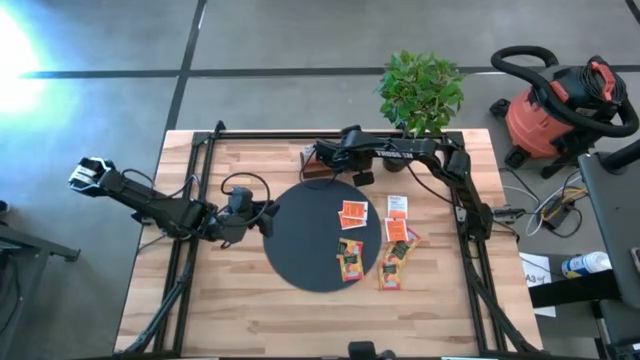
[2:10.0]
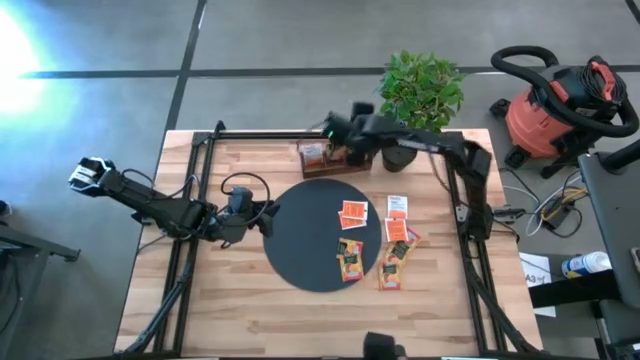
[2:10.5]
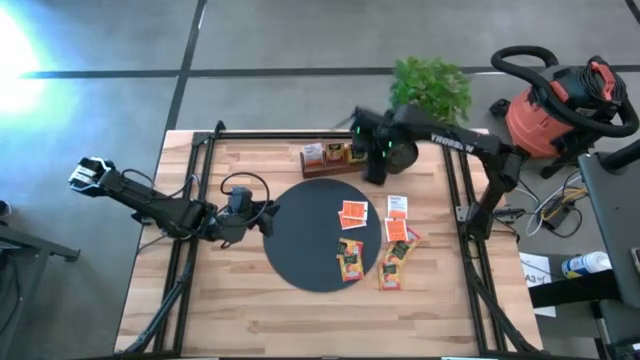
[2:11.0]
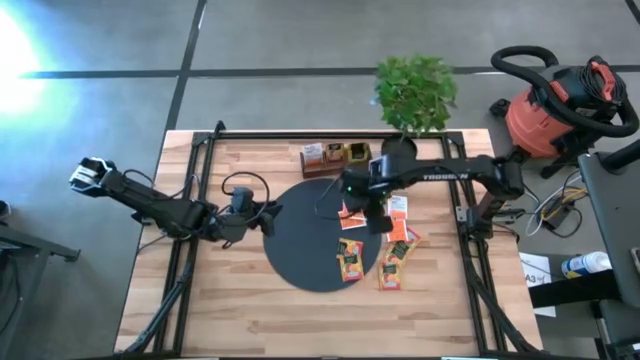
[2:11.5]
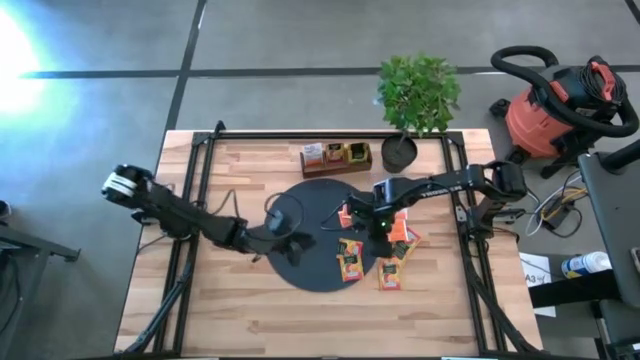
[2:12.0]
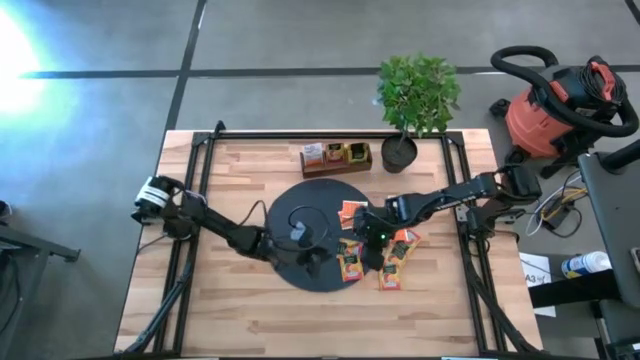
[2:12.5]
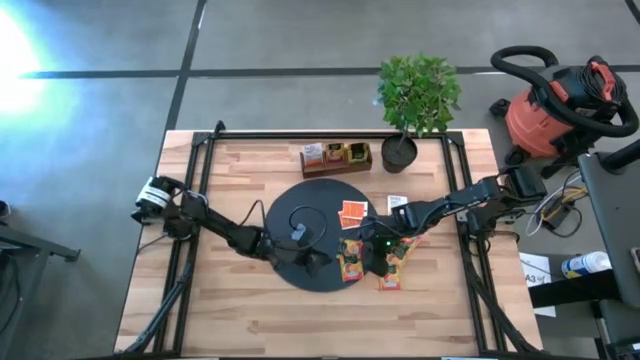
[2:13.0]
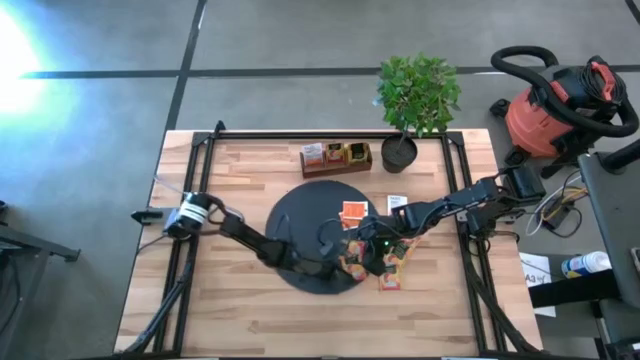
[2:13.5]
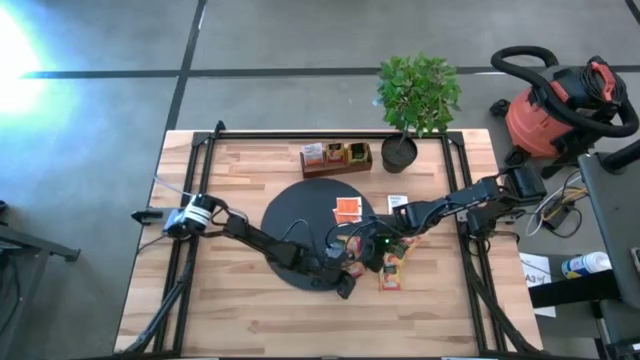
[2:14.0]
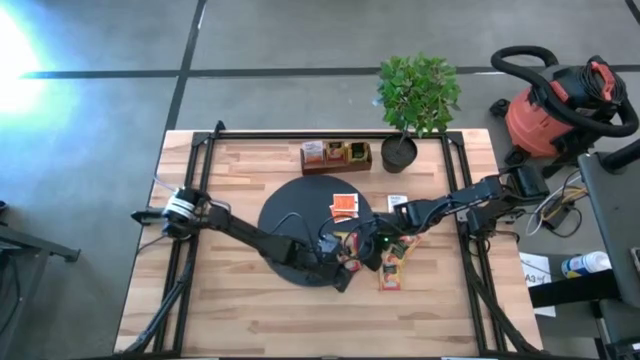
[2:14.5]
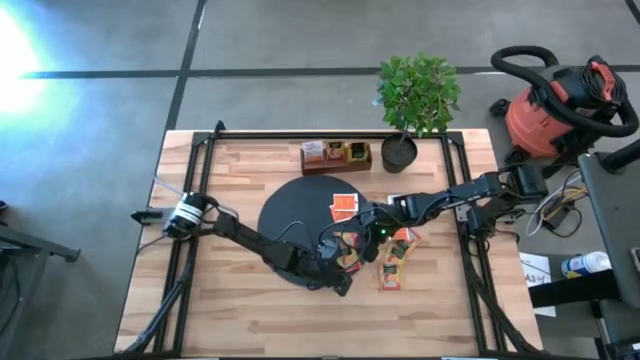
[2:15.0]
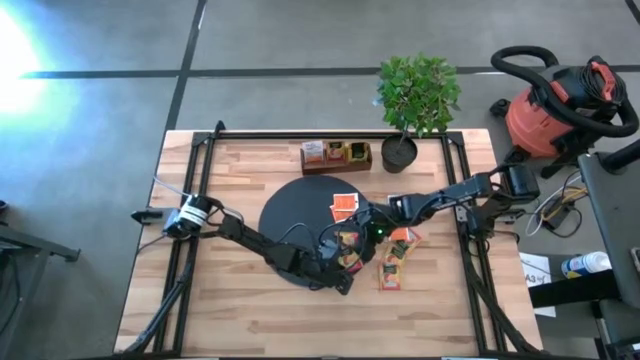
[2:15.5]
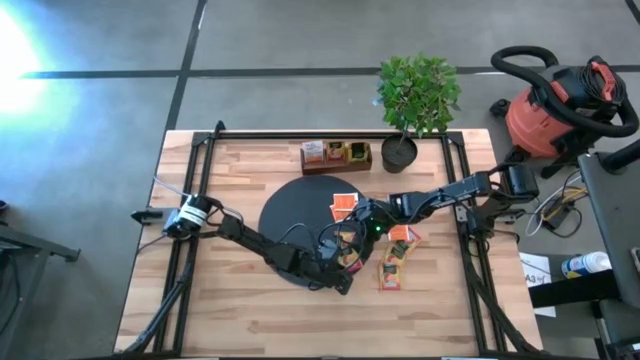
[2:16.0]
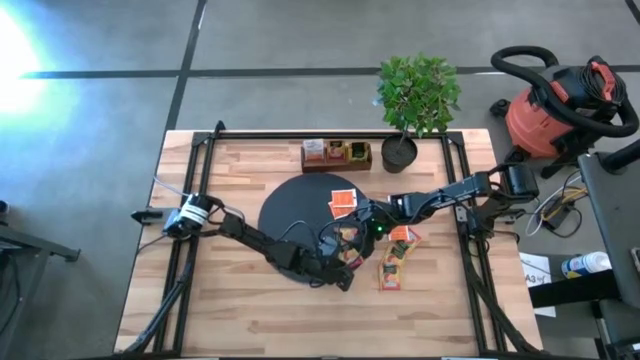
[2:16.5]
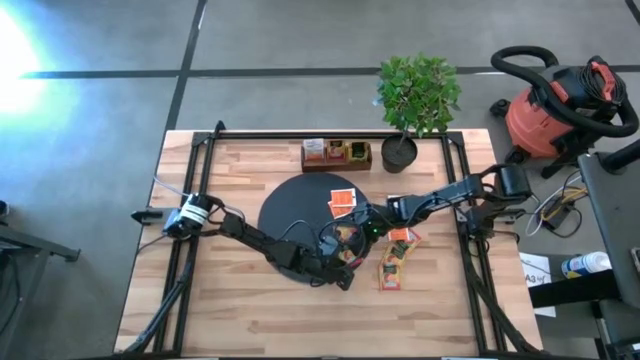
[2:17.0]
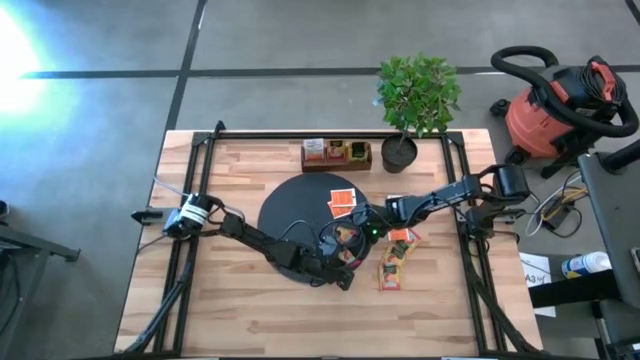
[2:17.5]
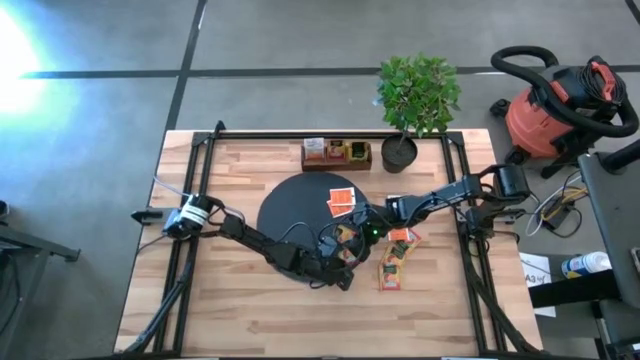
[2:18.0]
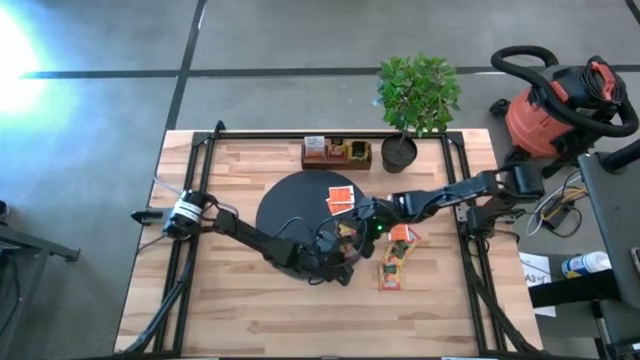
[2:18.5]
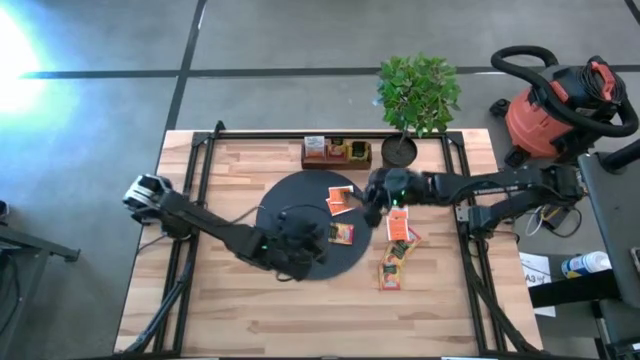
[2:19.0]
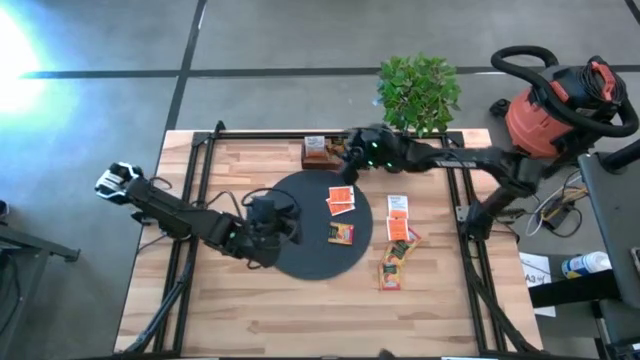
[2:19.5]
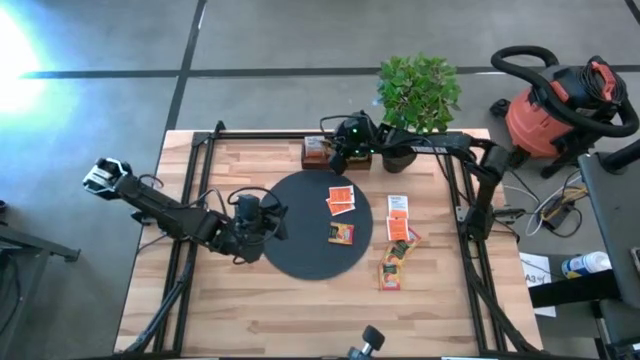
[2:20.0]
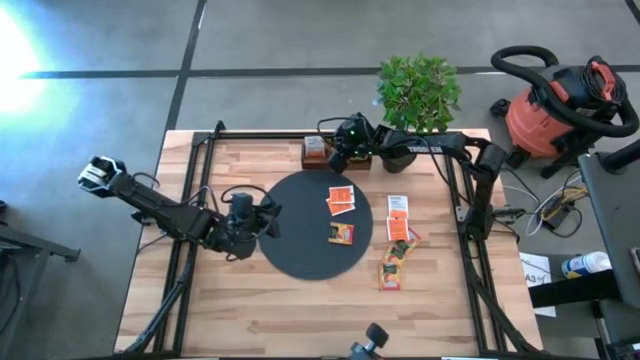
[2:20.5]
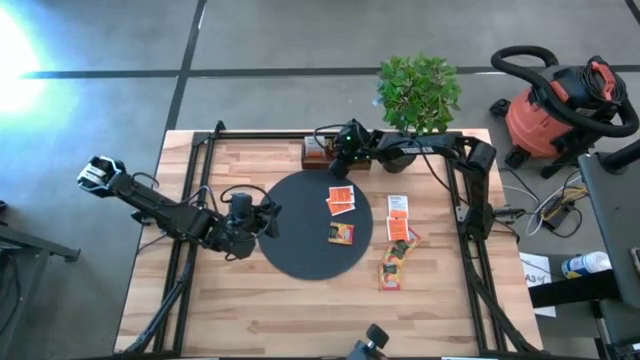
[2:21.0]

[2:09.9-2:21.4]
Task: Pick & Place Tea
Put the orange tea bag into the middle section of the brown wooden organizer

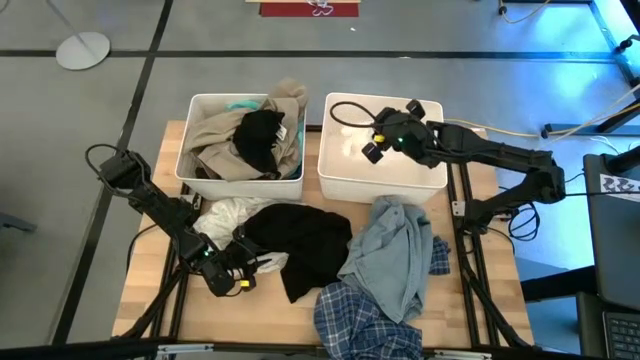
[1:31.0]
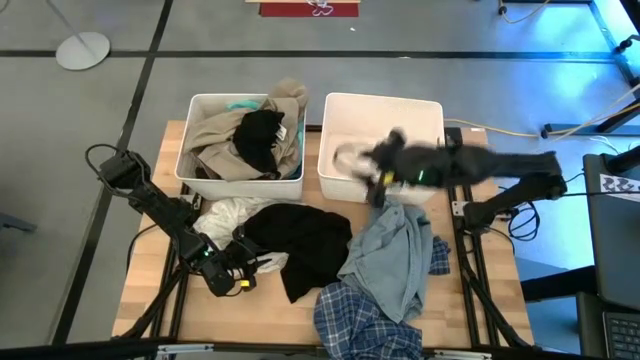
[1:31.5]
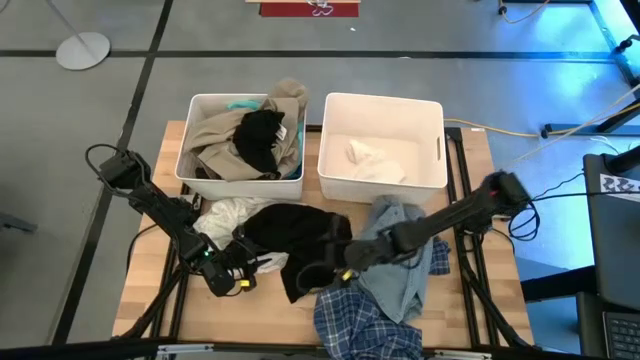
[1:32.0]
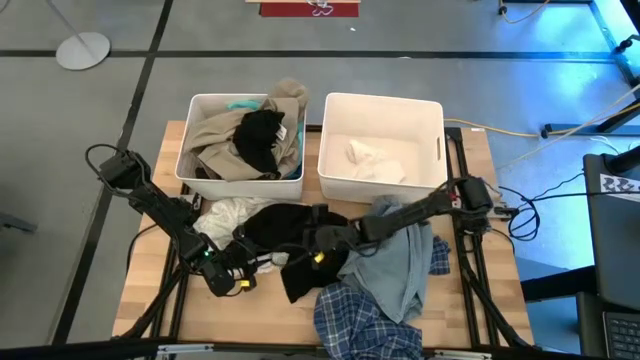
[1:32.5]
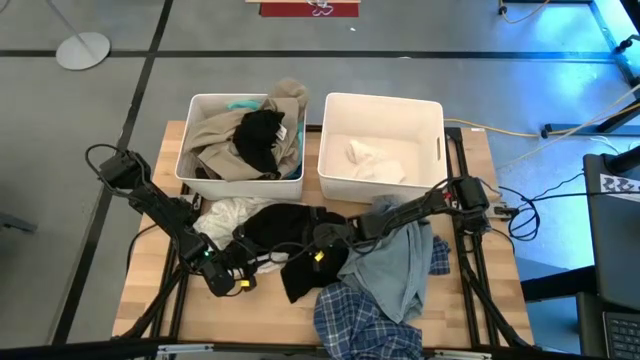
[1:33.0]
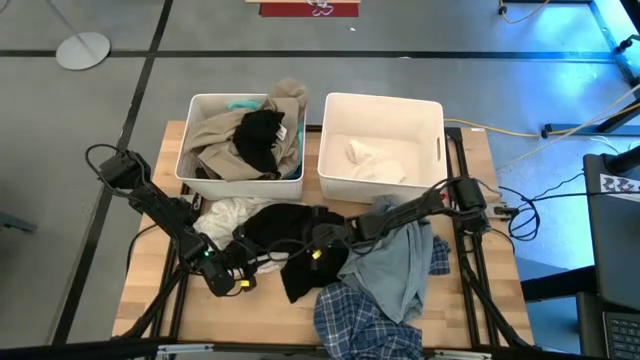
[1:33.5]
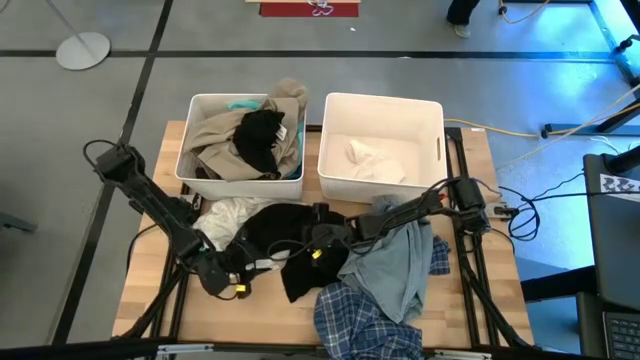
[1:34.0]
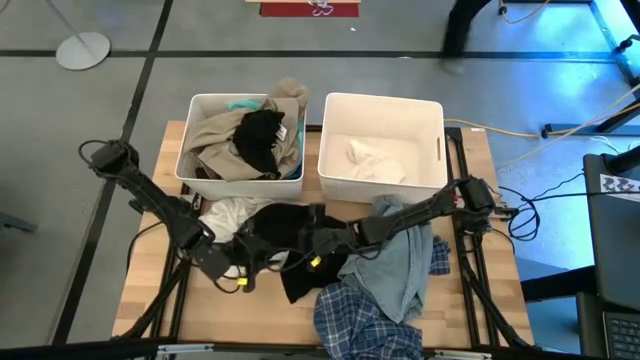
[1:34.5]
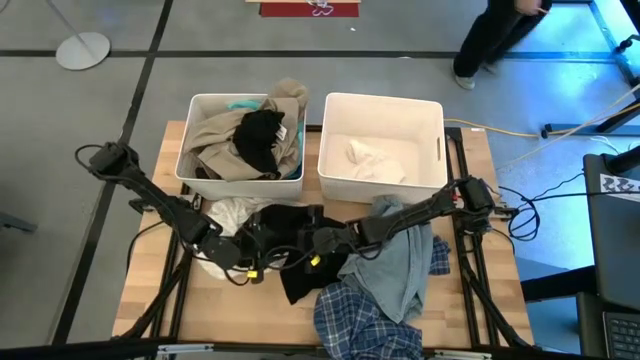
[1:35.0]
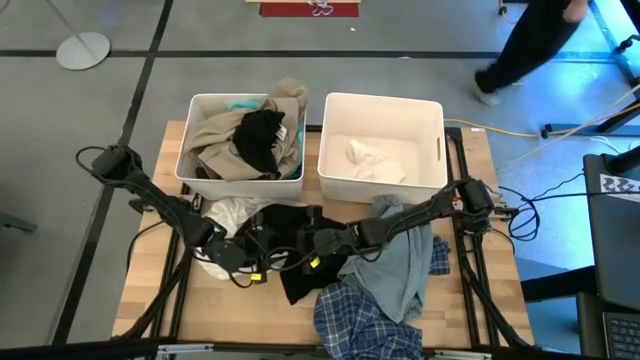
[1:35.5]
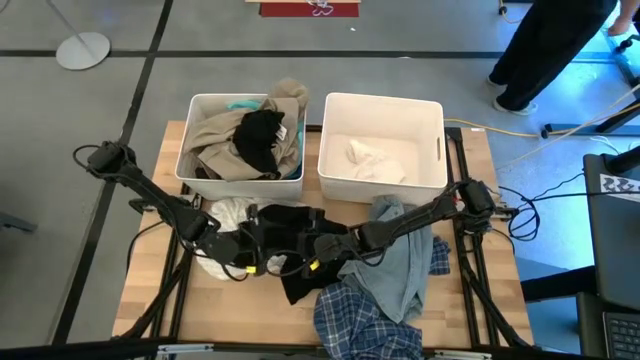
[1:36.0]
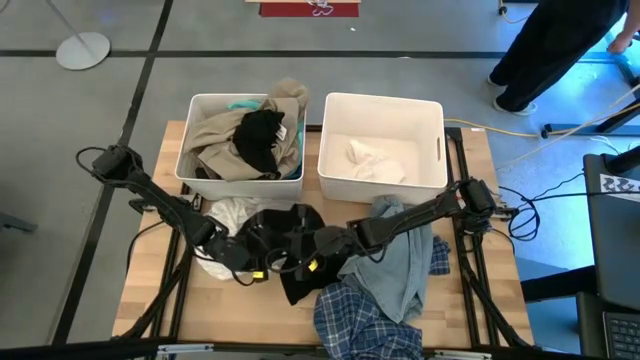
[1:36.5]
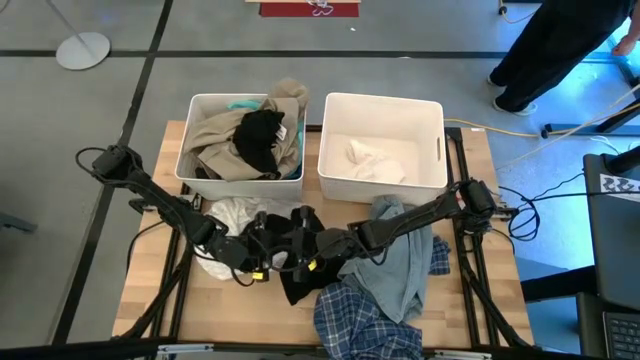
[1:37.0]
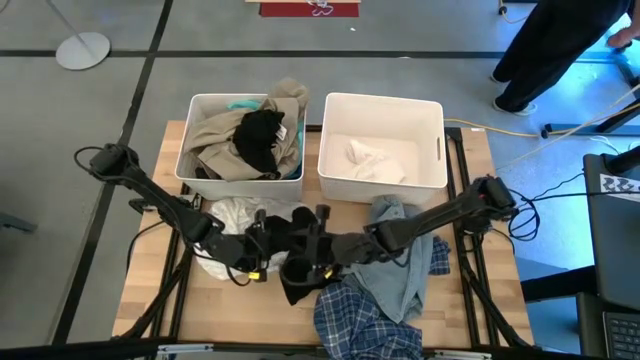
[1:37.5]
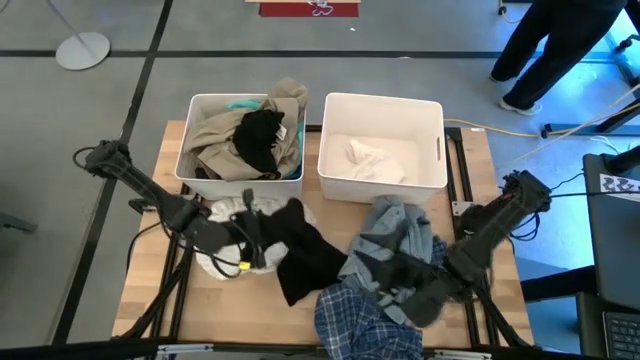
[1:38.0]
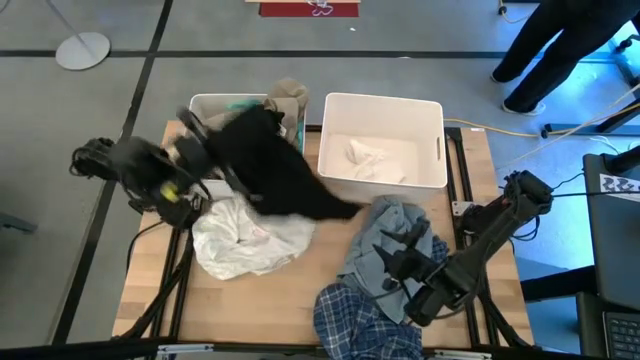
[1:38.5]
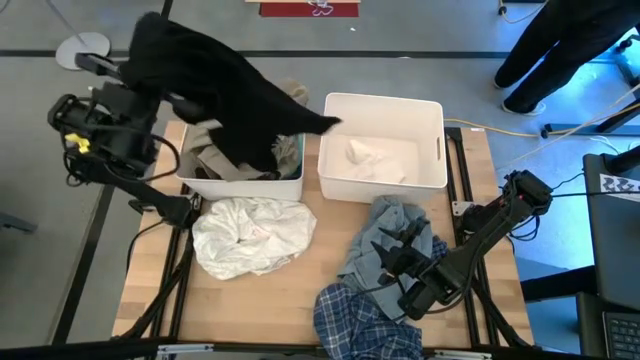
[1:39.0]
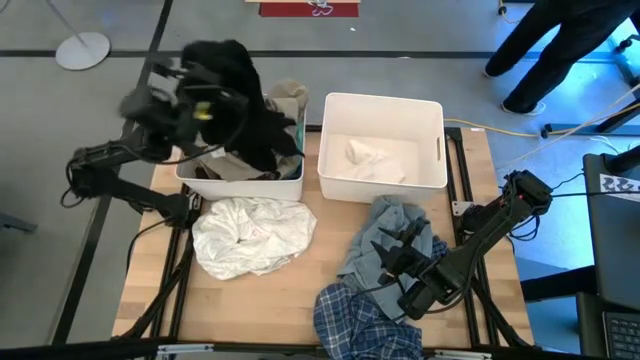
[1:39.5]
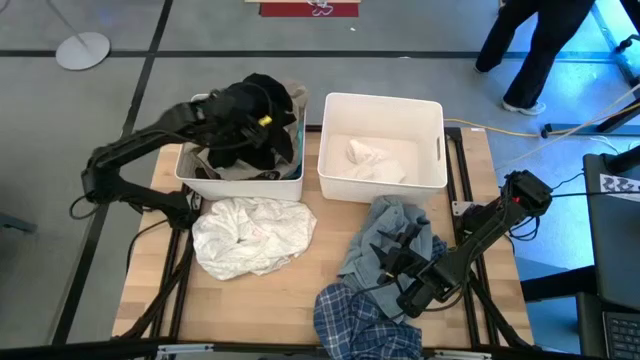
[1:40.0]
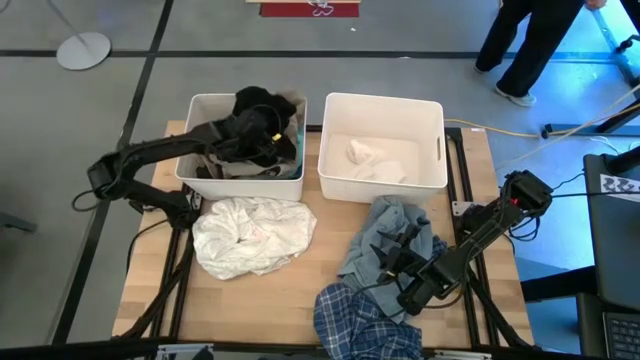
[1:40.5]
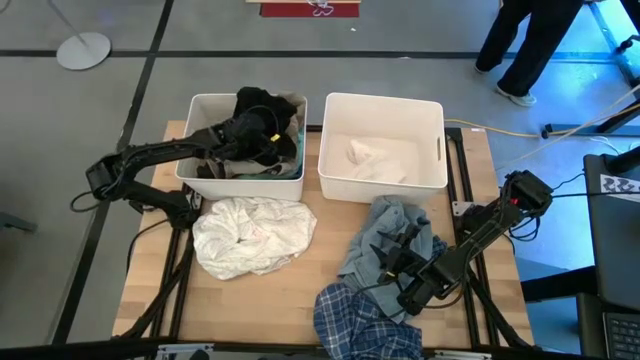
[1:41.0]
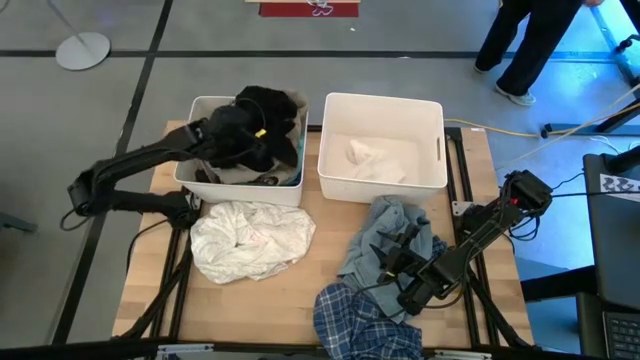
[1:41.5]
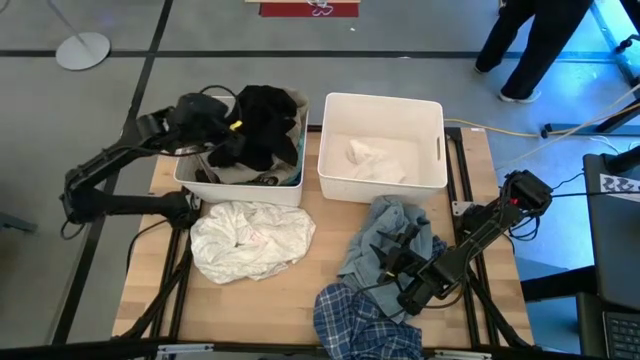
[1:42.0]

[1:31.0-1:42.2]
Task: Sort clothes
Put the black shorts into the left white bin
